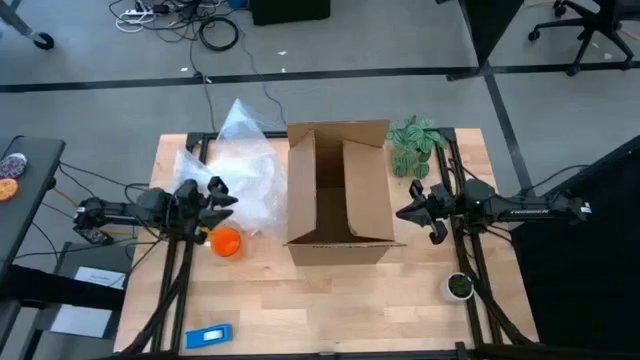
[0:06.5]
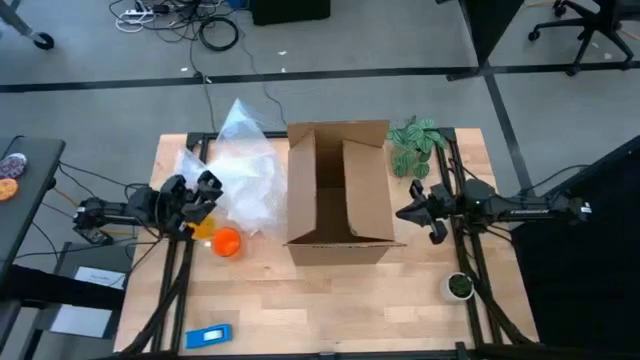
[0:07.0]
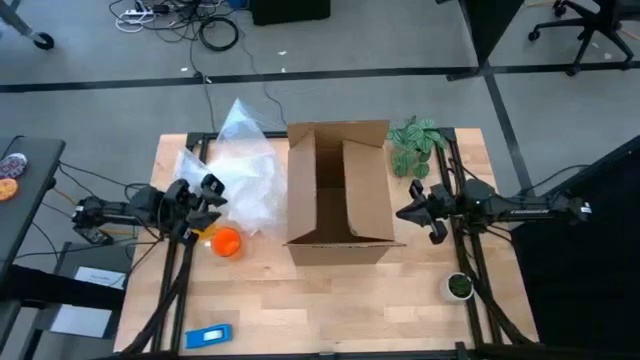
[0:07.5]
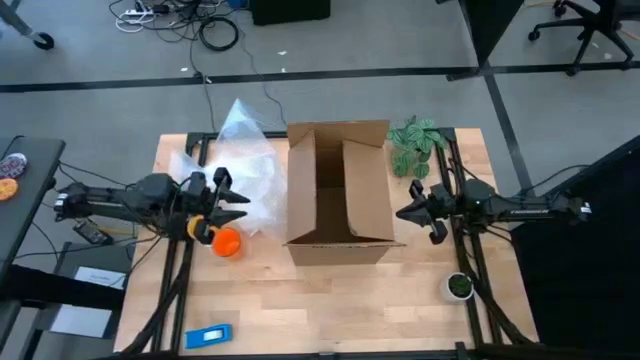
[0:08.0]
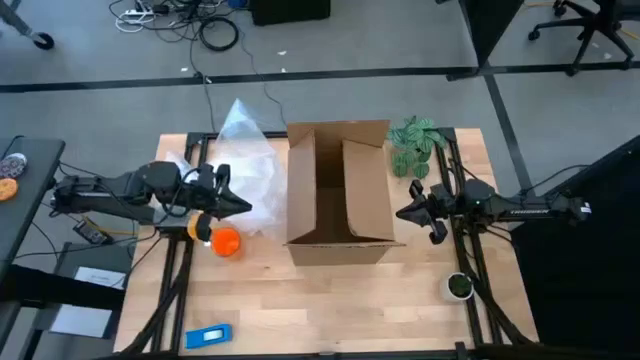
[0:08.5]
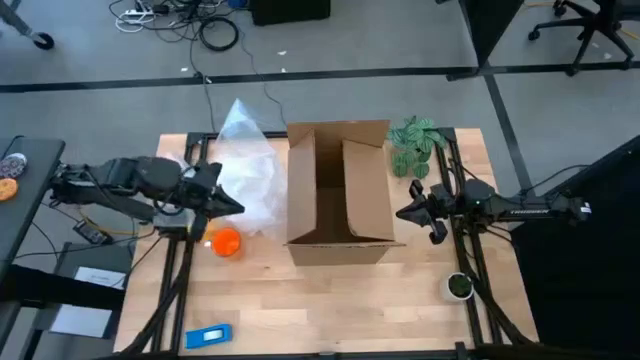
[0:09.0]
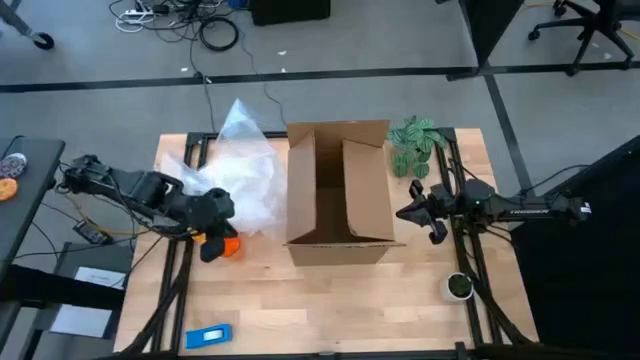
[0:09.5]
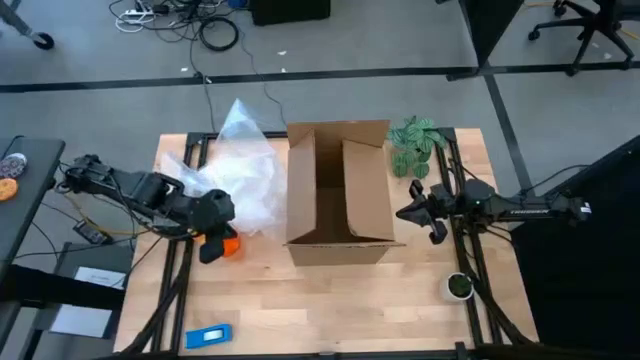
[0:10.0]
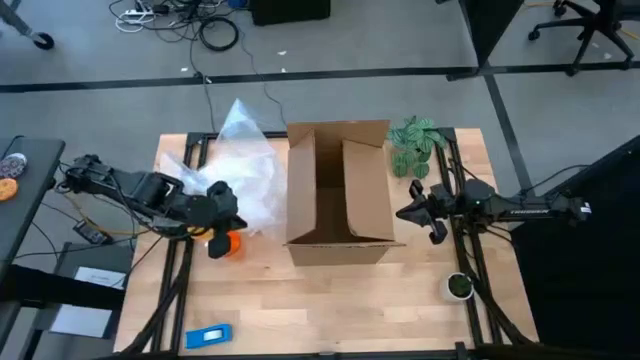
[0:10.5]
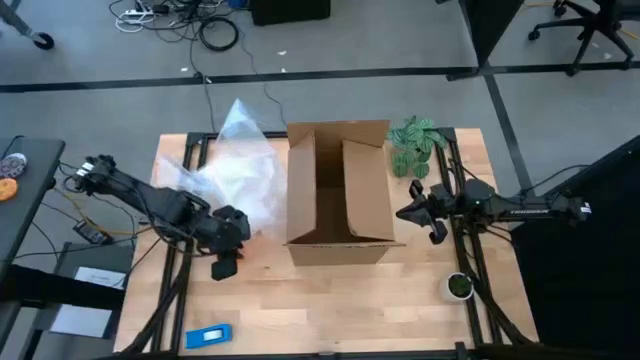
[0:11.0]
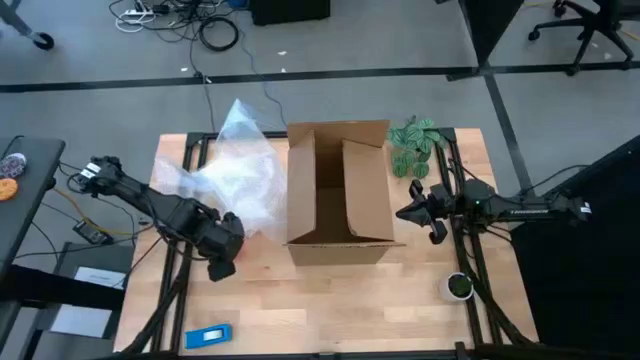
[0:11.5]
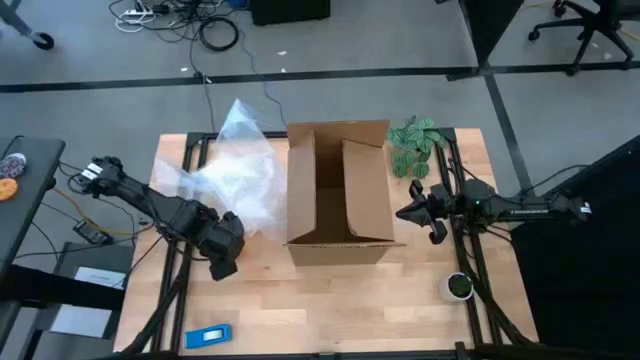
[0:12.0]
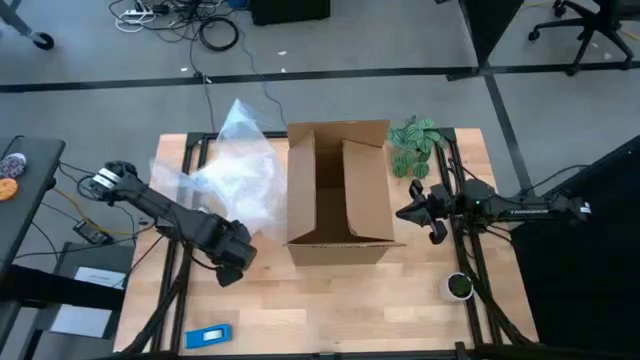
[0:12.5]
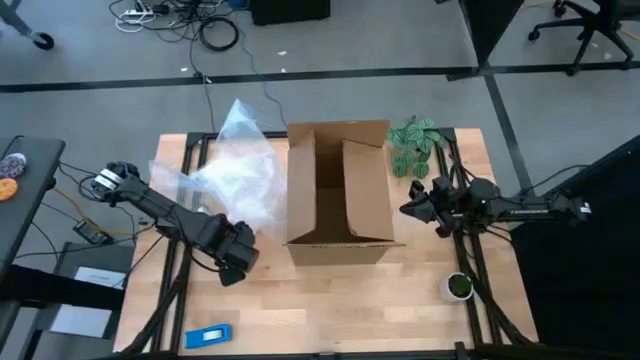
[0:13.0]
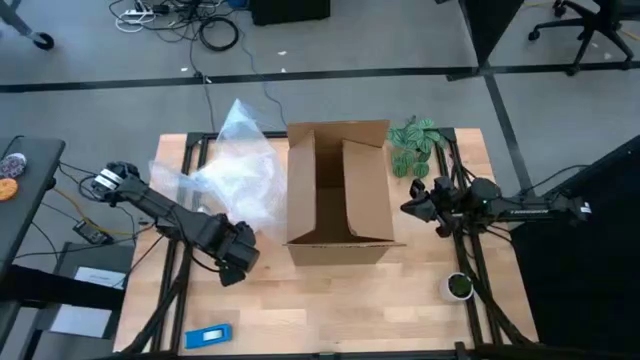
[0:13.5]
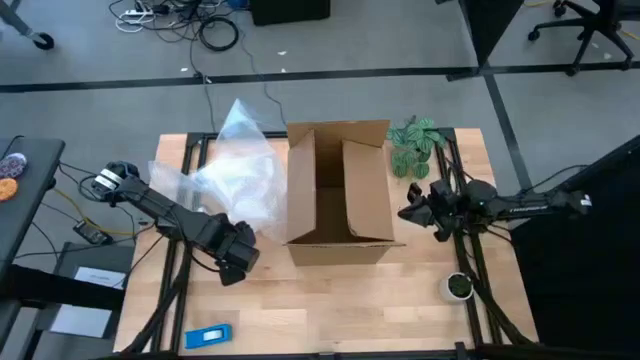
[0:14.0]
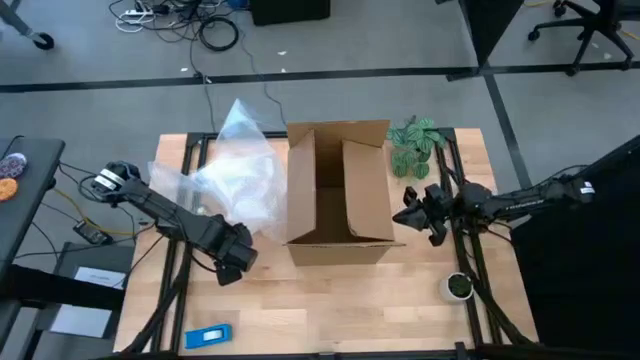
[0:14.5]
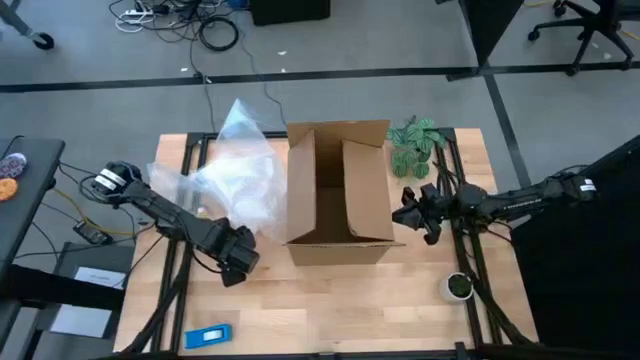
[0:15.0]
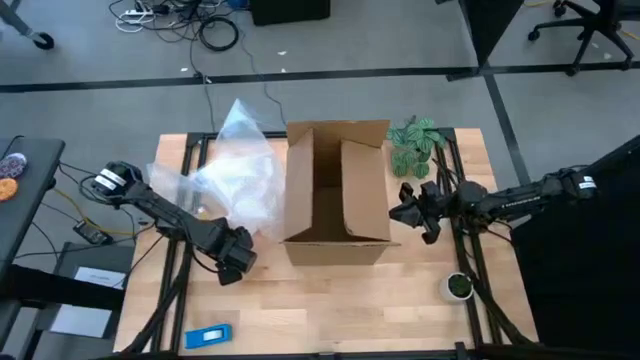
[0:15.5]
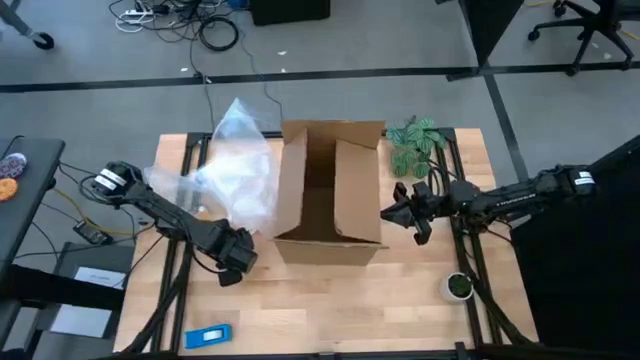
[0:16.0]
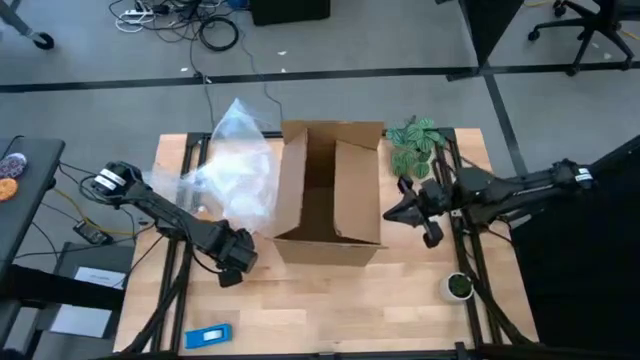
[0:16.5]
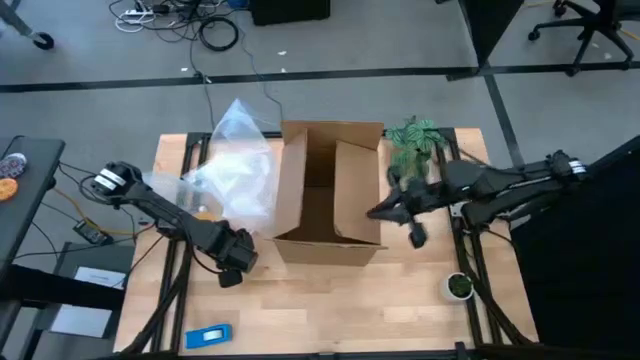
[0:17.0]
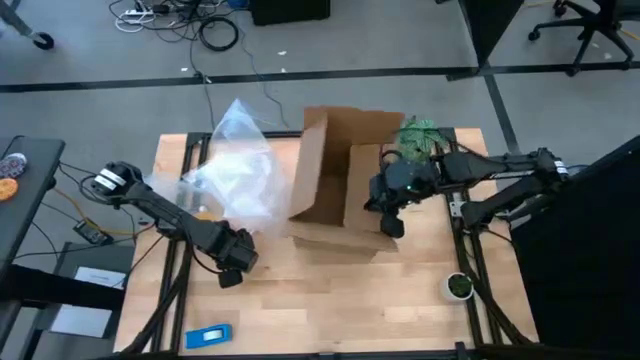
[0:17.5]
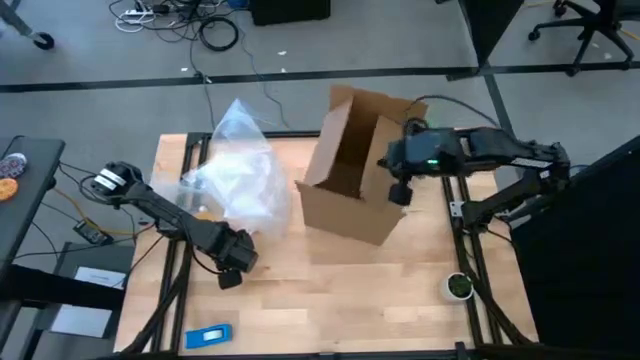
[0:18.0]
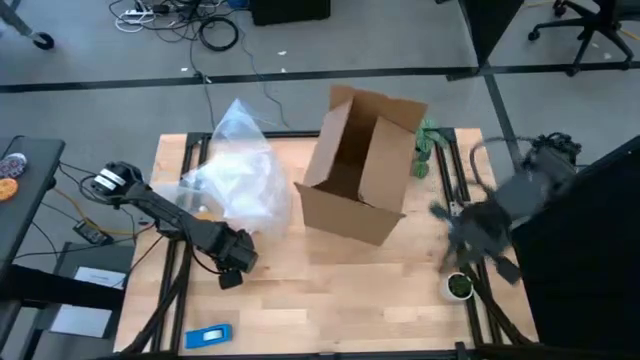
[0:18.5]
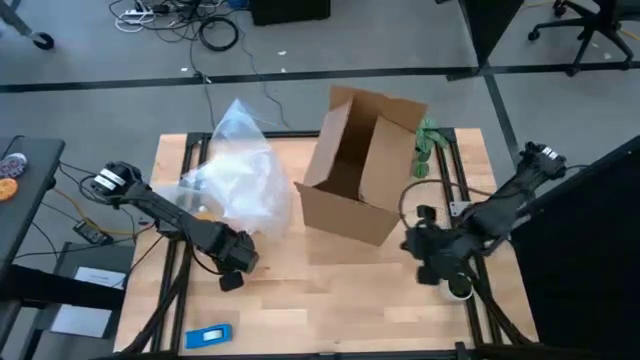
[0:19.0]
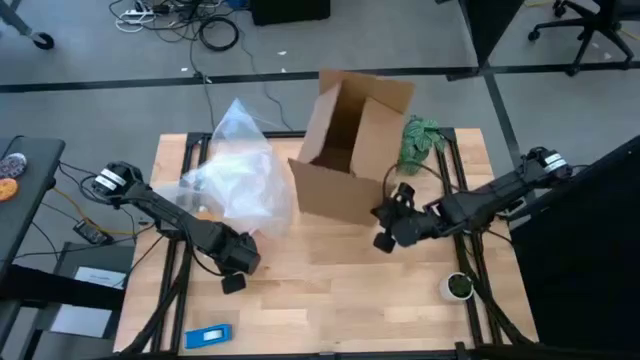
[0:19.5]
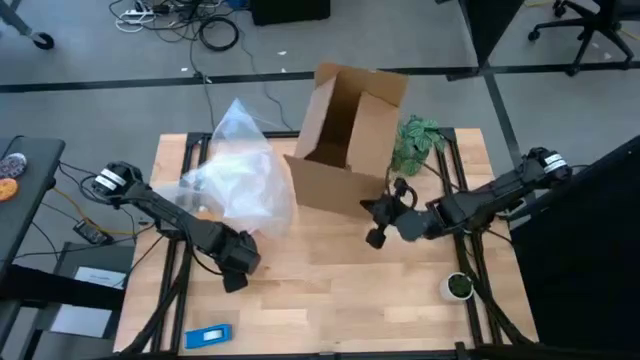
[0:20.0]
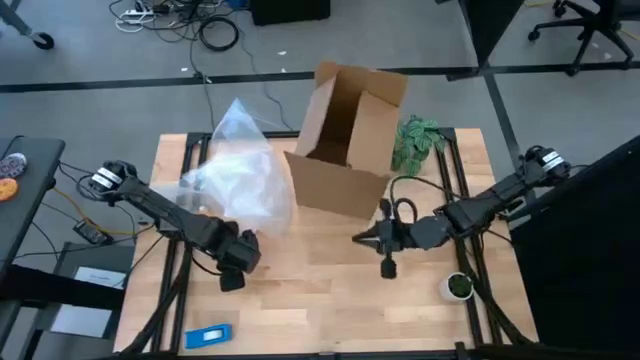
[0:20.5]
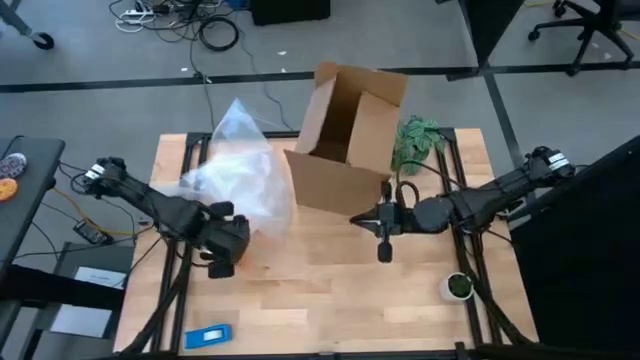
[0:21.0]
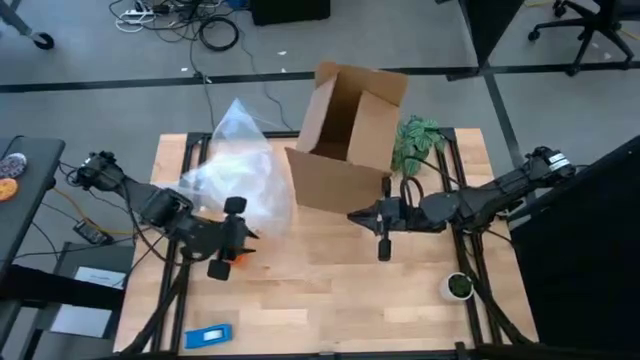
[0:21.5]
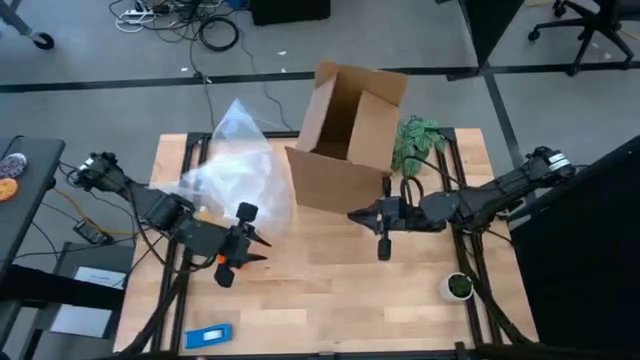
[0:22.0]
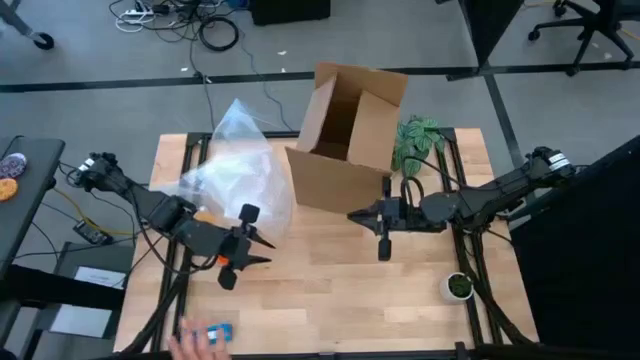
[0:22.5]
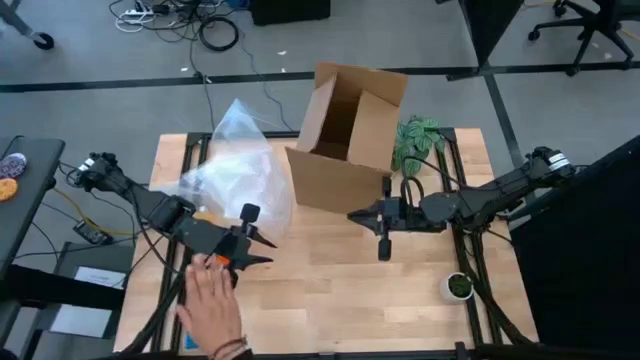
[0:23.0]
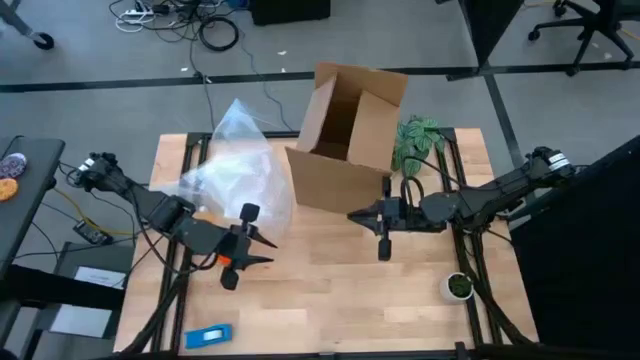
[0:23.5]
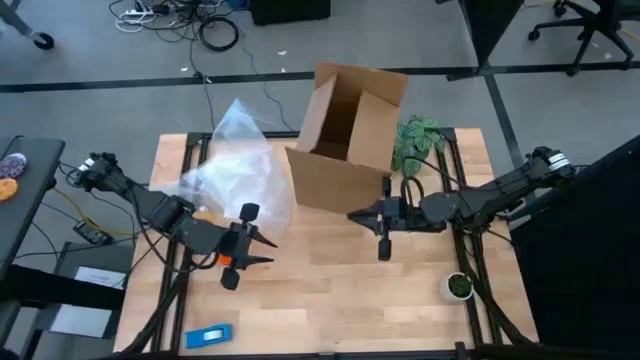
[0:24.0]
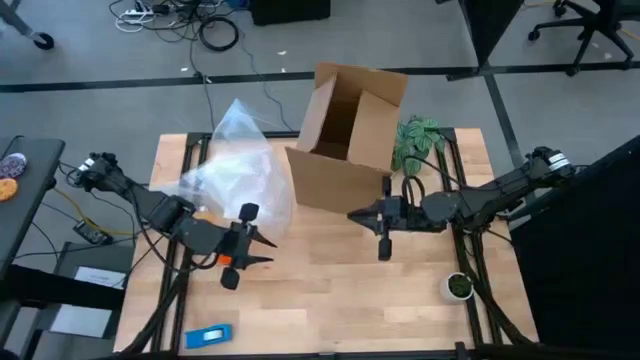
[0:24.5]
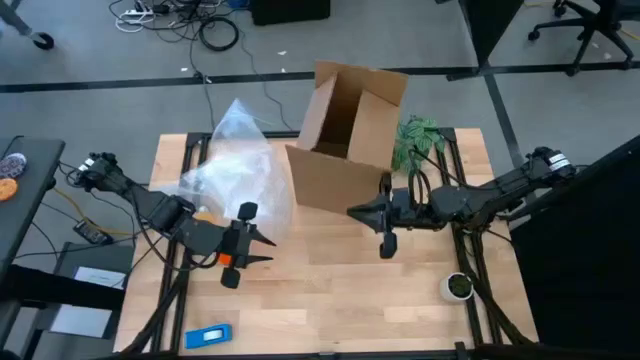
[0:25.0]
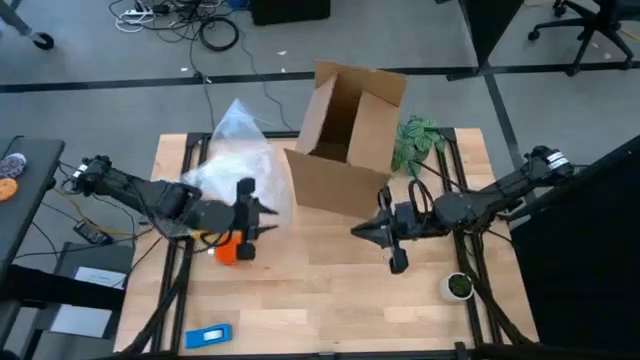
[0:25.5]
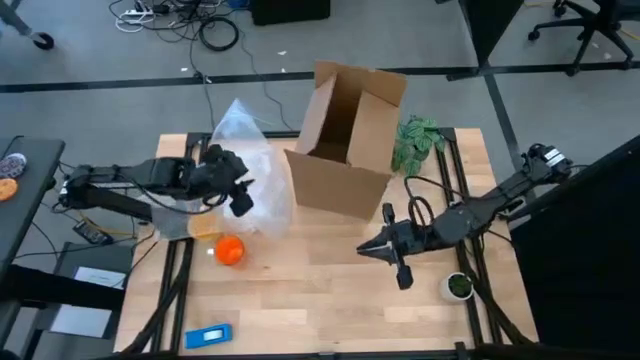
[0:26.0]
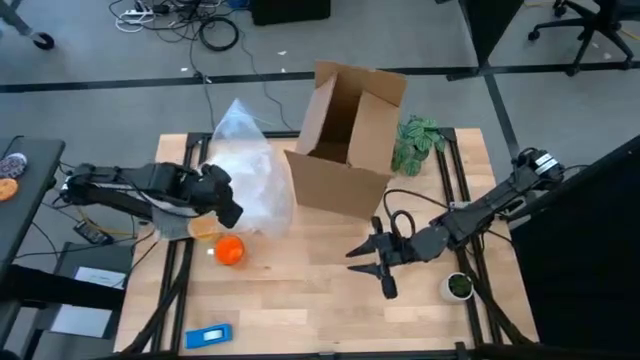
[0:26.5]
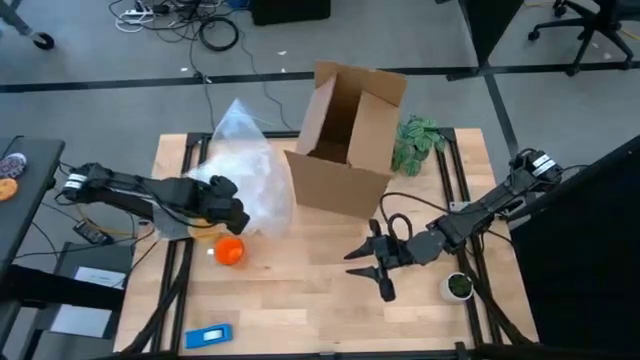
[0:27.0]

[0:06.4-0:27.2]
Task: wrap mug
Wrap the orange mug with transparent bubble wrap
